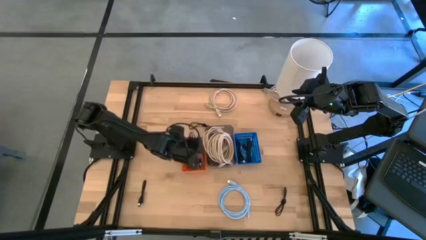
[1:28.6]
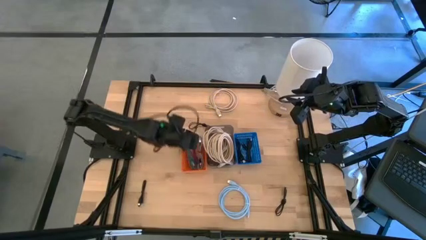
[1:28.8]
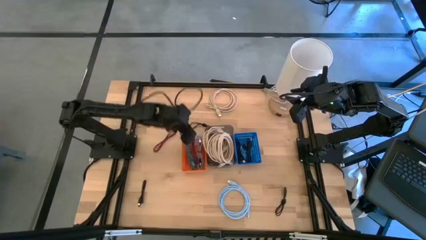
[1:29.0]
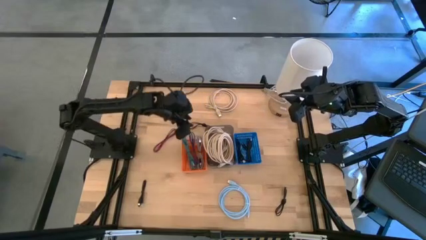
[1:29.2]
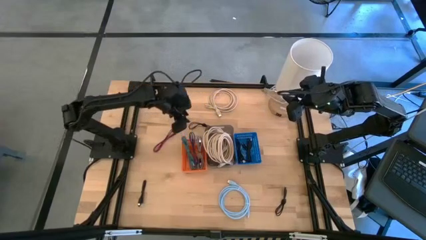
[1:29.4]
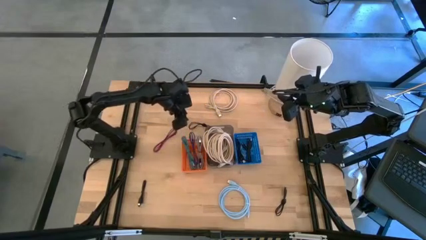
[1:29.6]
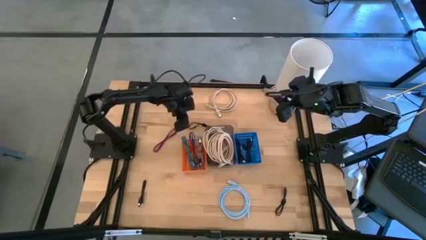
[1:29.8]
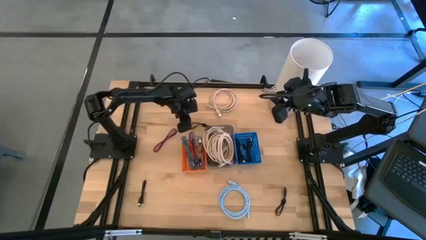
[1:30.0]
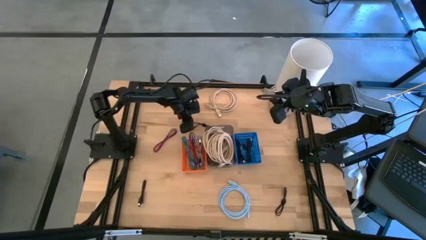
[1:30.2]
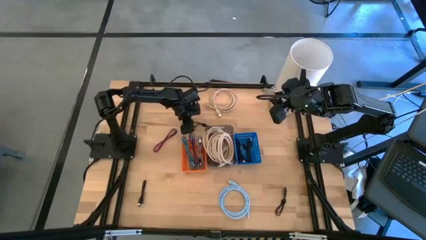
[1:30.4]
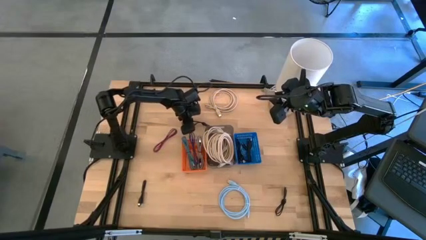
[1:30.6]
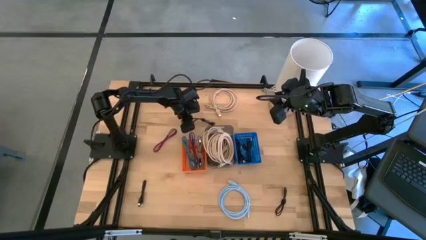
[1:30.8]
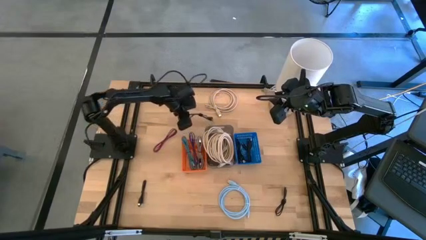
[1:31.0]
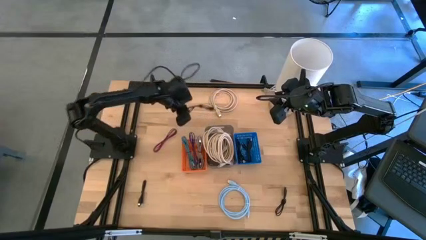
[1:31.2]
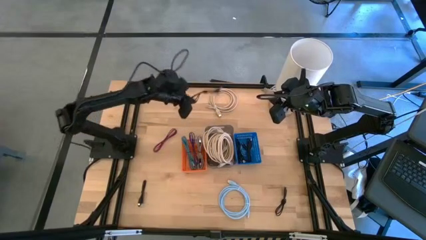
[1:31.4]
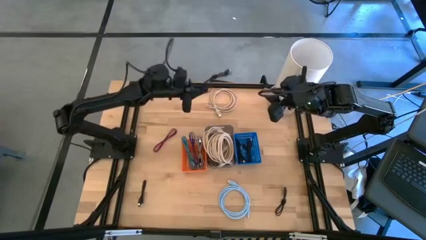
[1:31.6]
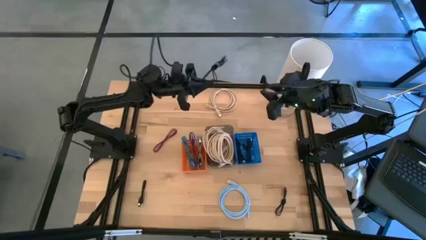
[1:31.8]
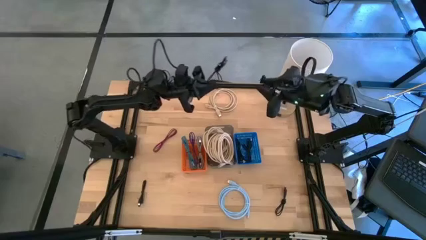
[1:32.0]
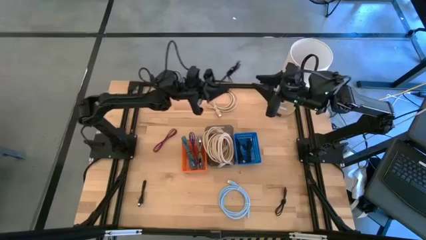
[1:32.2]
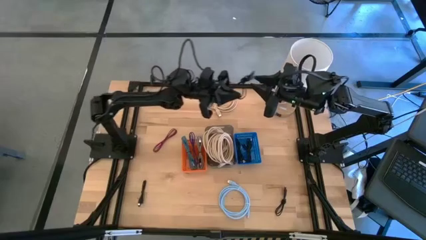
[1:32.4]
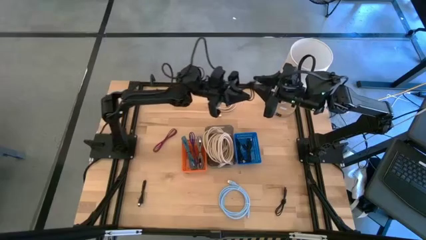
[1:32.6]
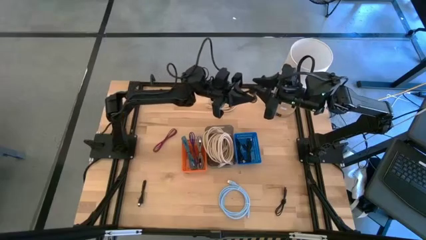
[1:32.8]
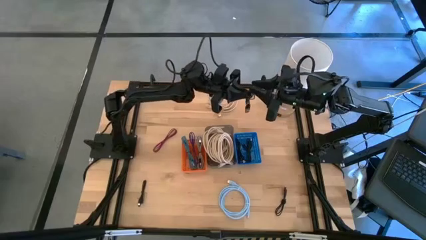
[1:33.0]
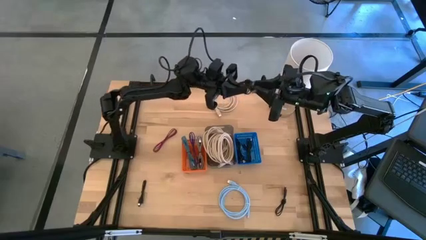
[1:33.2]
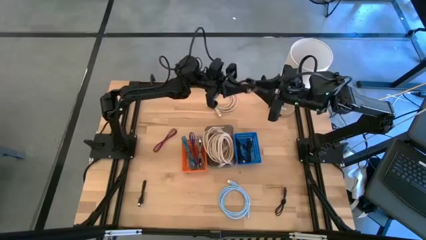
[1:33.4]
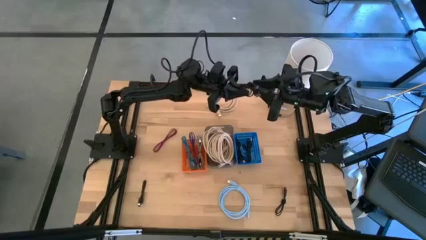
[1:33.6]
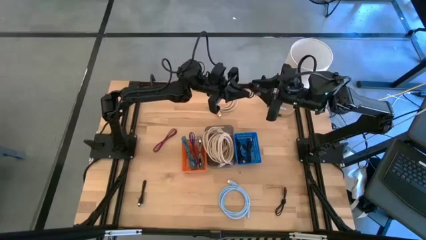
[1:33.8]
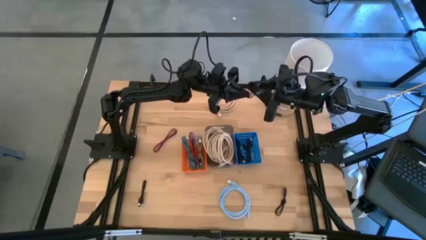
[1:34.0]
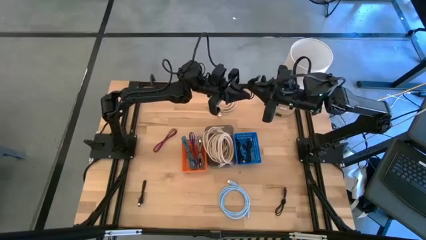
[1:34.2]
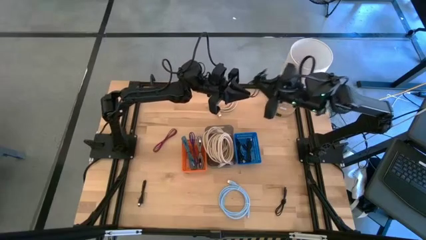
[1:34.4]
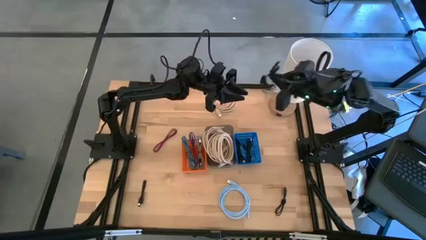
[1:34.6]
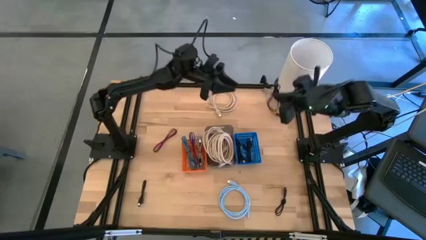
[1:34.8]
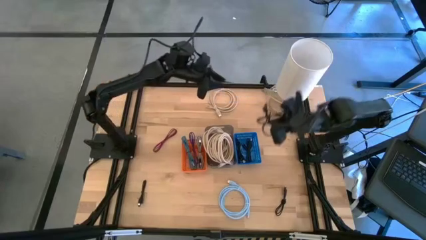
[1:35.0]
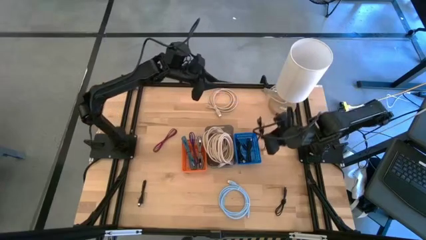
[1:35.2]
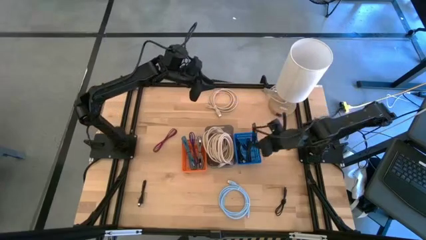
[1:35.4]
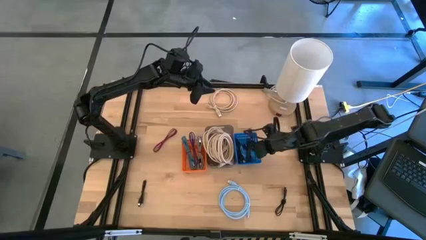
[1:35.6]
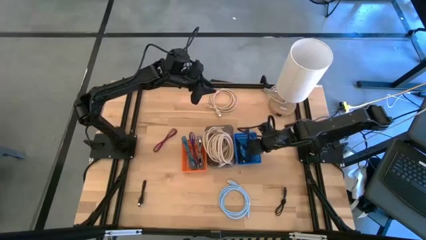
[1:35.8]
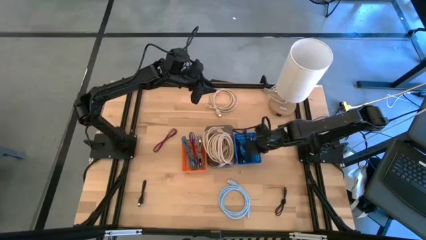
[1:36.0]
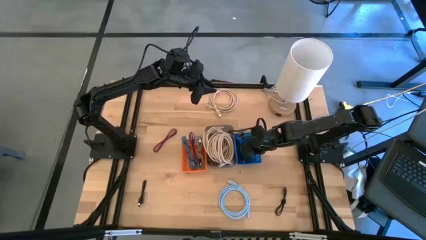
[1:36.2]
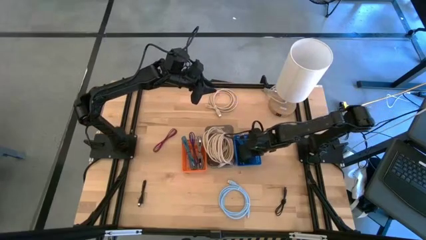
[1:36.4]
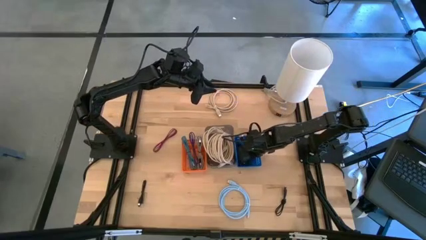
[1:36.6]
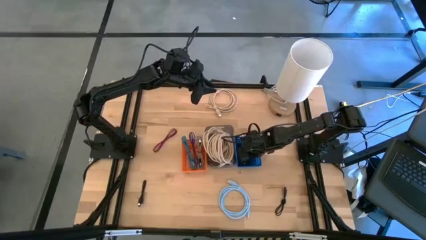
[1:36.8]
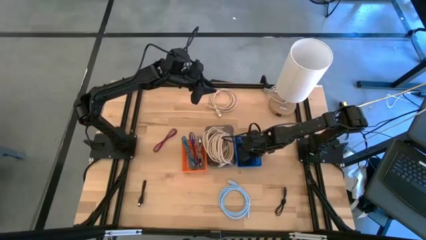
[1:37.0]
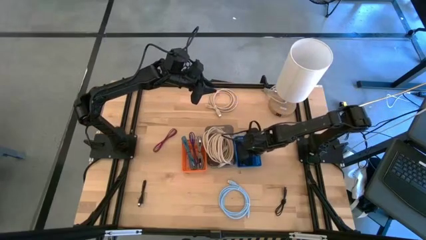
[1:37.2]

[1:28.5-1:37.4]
Task: Pick & Place USB Port
Put the black charger cable into the blue bin

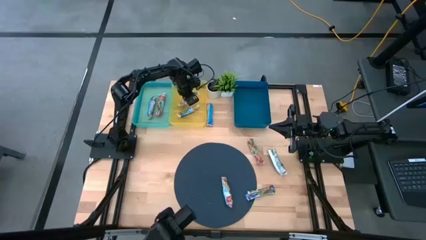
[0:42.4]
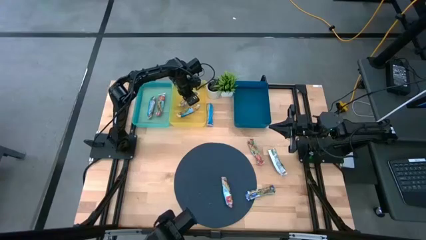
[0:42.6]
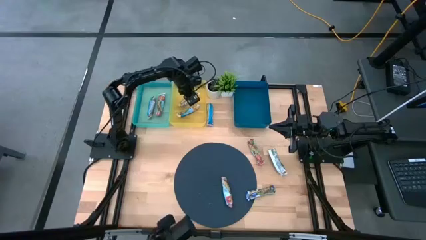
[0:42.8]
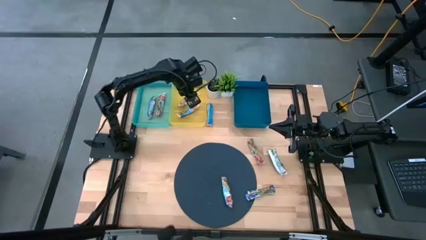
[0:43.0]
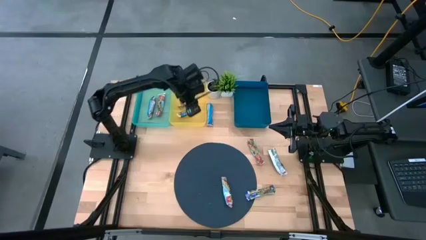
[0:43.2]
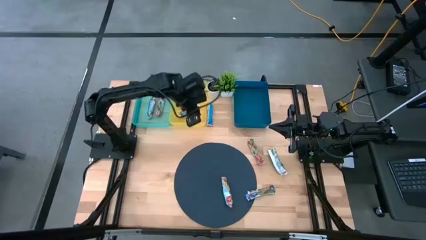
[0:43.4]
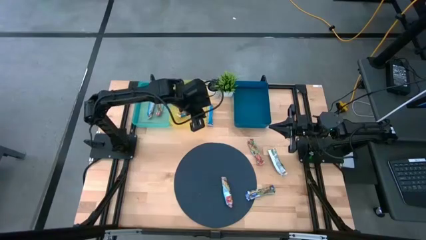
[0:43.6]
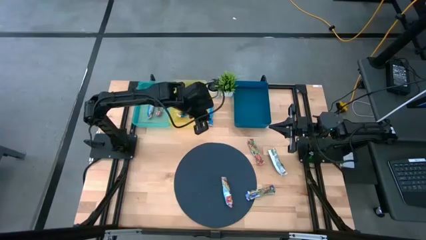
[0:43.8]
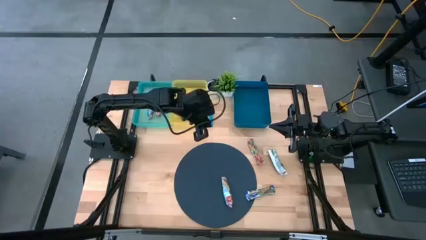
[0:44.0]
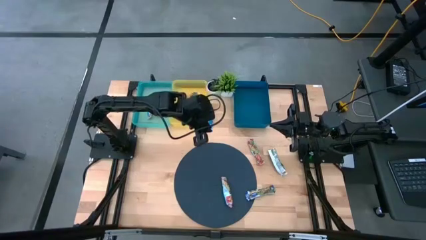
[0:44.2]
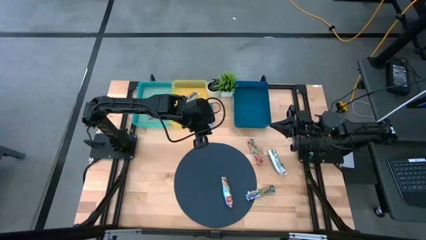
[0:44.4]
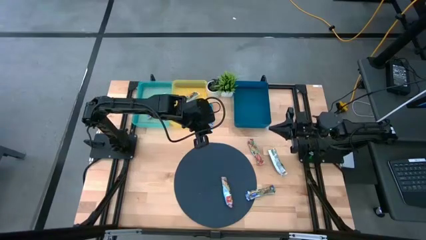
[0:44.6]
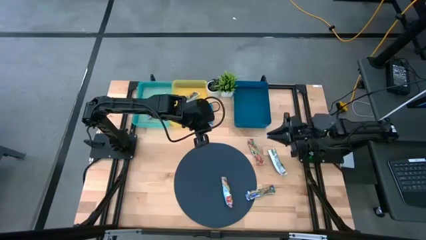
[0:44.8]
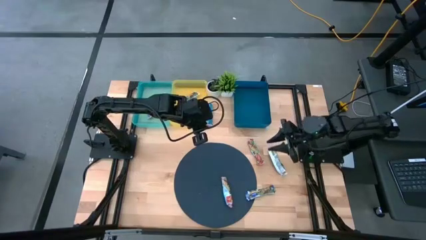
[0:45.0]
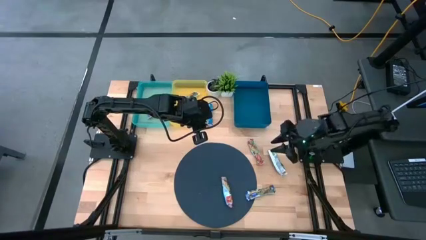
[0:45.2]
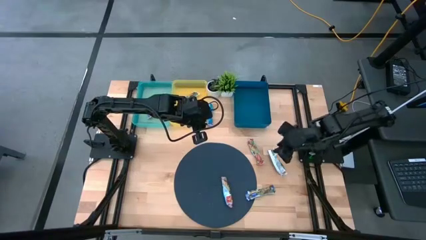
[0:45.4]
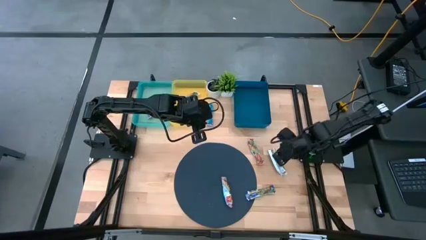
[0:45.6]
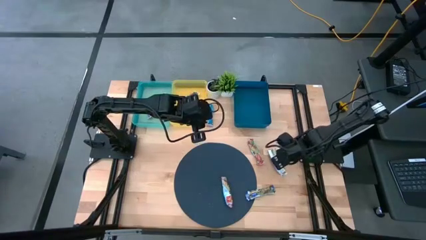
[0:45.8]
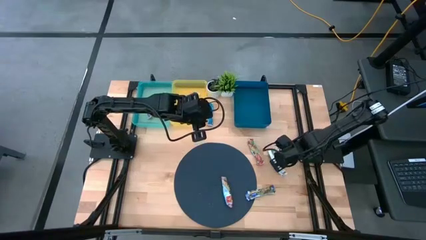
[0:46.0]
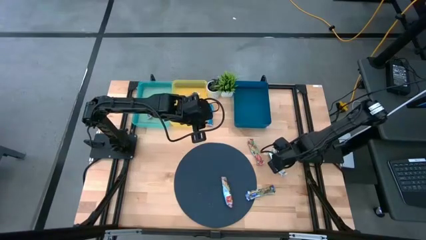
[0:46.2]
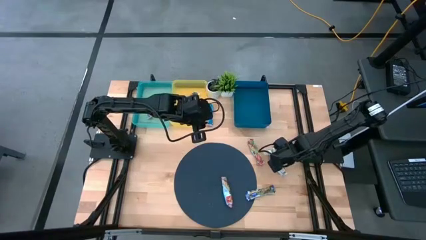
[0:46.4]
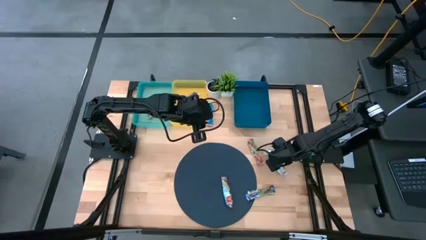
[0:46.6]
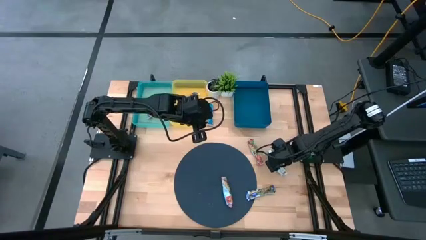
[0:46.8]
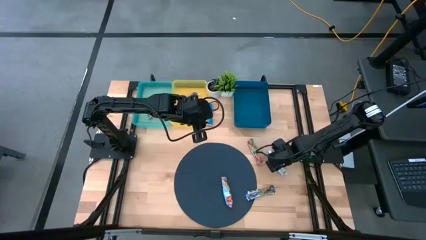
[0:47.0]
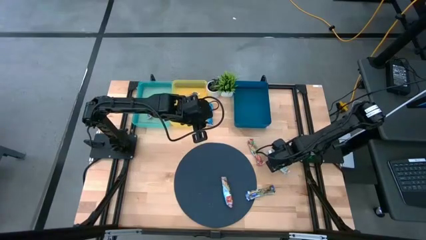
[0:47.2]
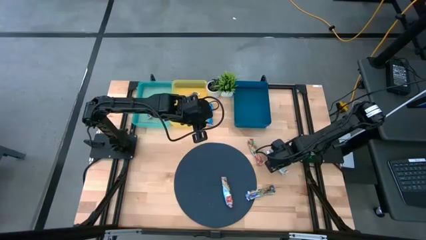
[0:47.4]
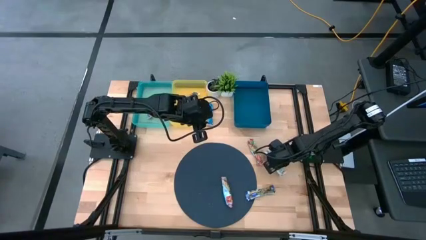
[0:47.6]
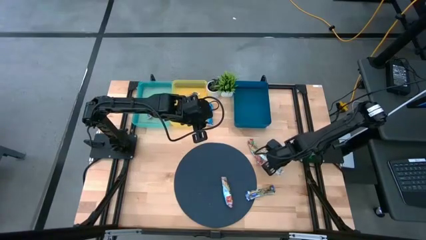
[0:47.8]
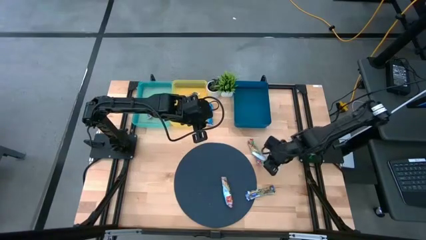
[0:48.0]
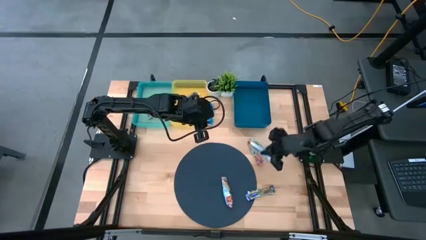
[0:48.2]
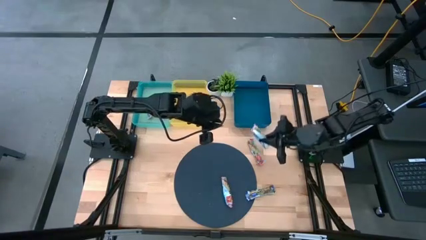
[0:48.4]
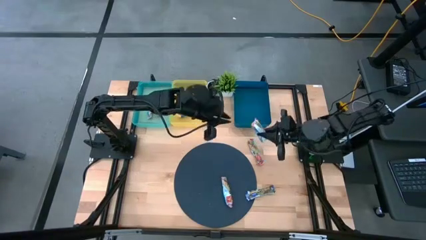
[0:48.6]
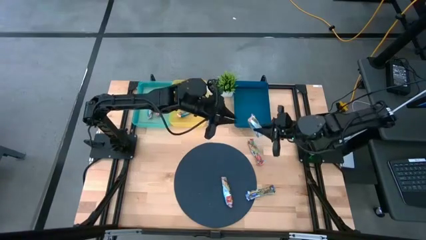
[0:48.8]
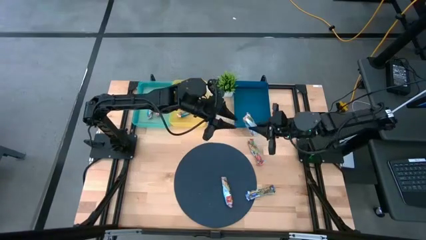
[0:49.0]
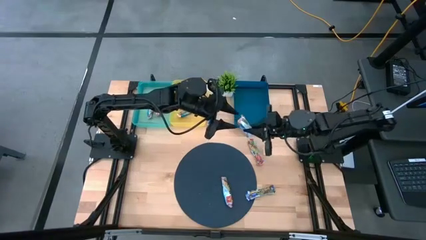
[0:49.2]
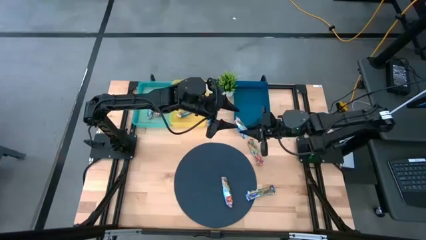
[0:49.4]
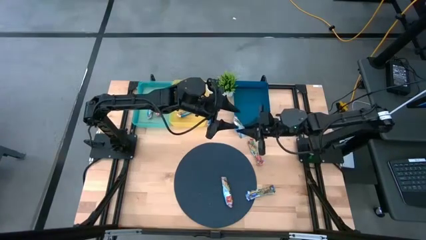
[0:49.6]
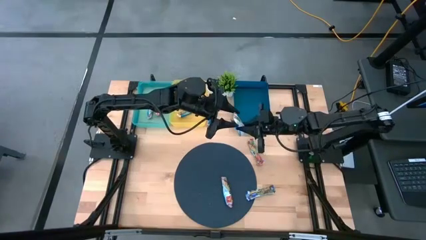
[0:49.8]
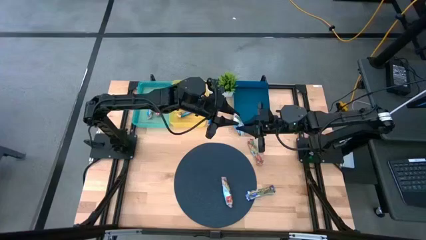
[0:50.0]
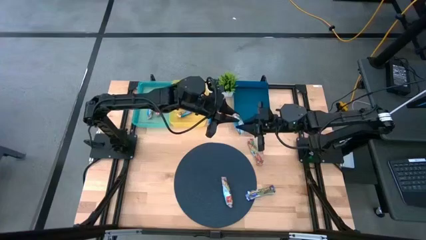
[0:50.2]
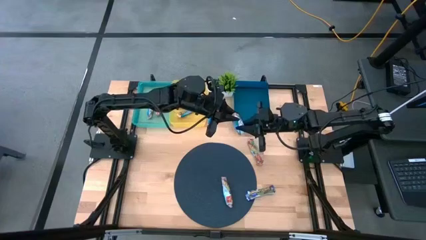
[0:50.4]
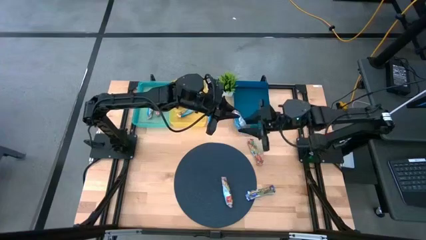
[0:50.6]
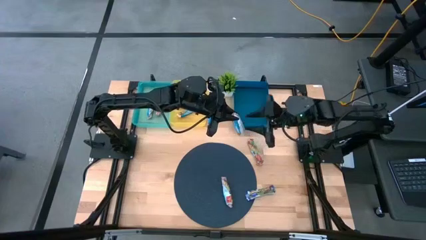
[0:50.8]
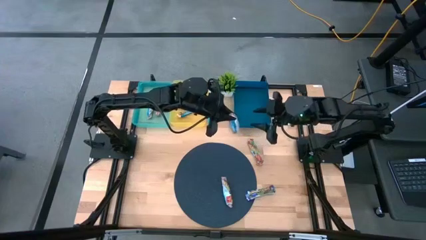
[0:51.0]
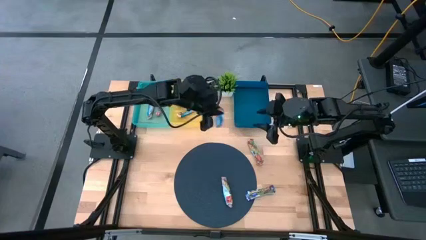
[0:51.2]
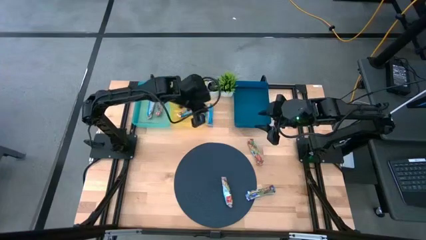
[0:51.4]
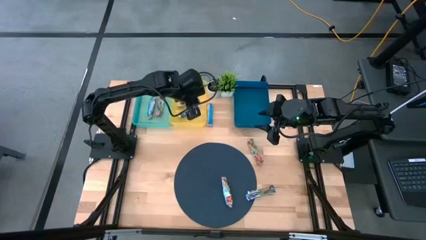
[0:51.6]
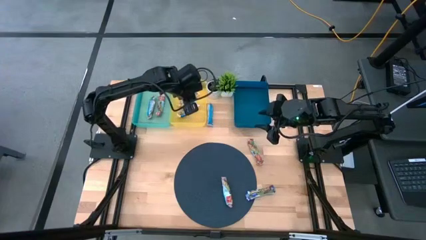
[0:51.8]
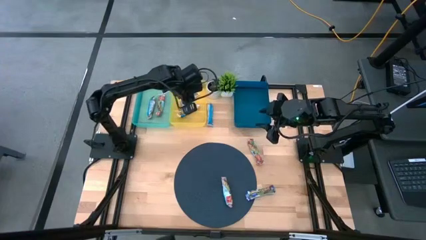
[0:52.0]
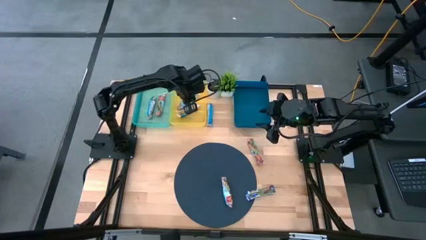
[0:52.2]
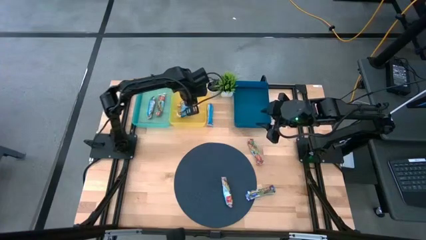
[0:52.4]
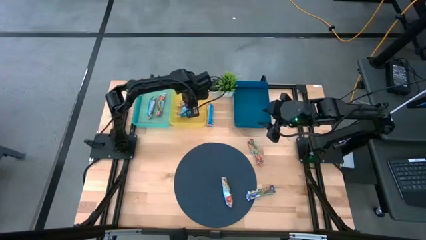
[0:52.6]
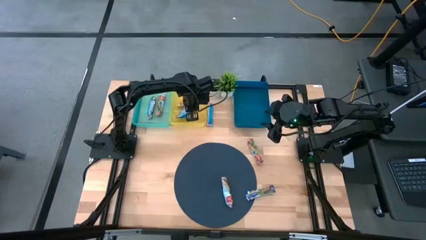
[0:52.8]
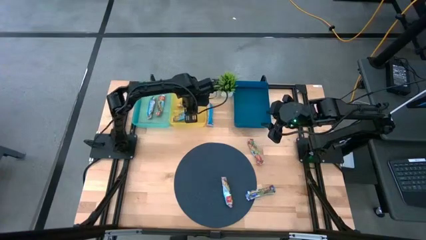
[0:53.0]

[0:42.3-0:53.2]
Task: Pick and place Granola Bars by type
Put the green granola bar into the yellow bin
